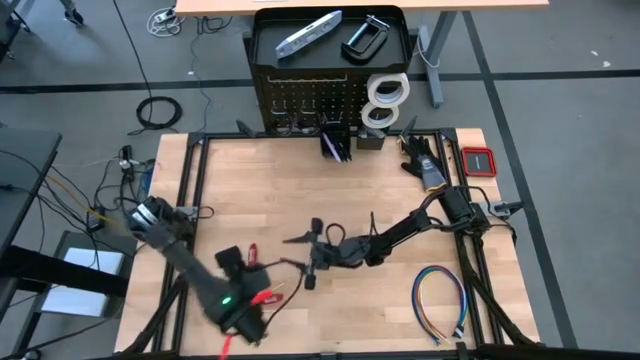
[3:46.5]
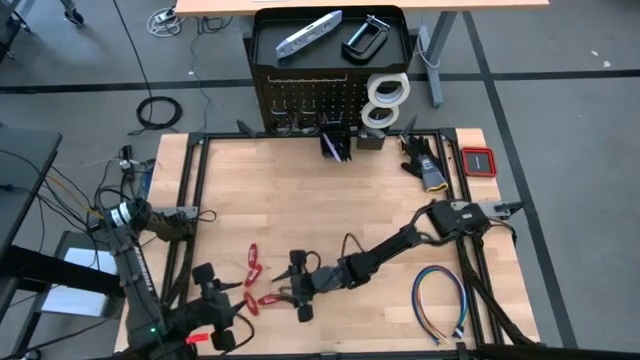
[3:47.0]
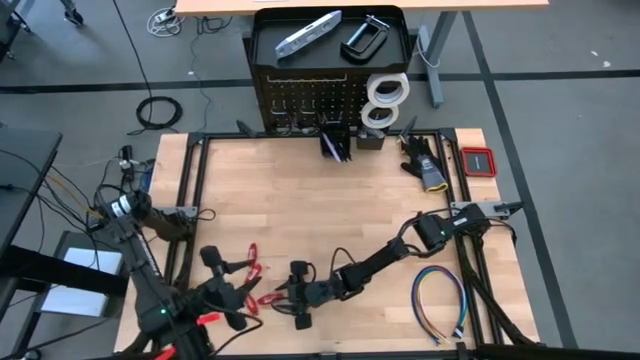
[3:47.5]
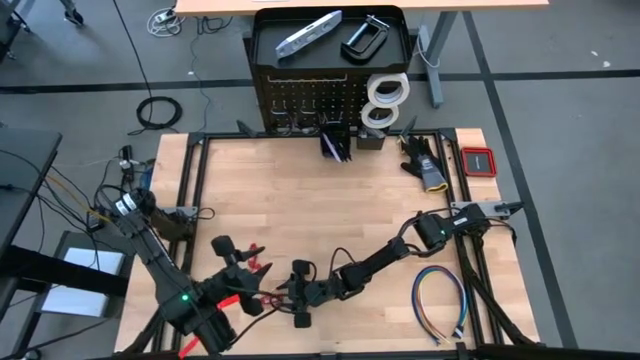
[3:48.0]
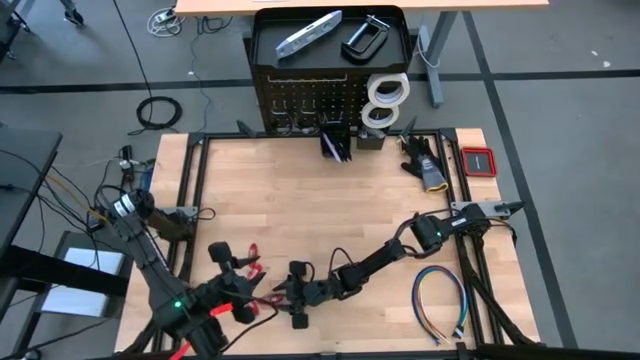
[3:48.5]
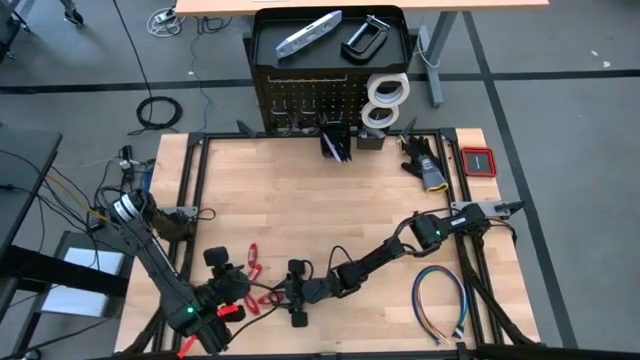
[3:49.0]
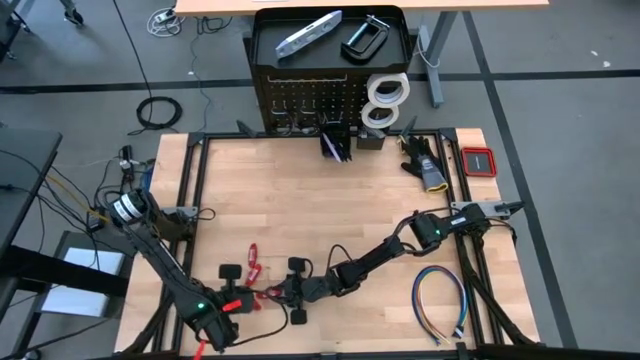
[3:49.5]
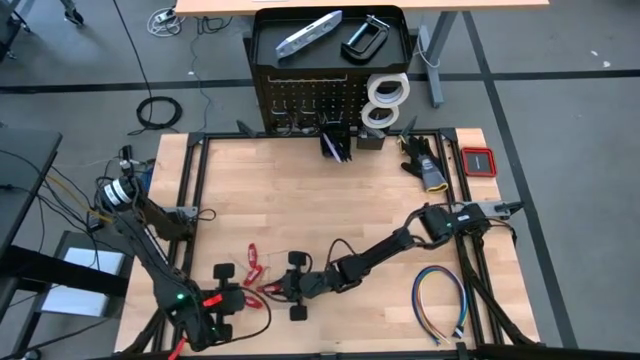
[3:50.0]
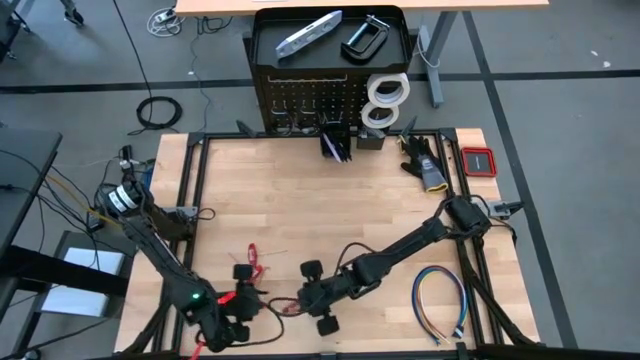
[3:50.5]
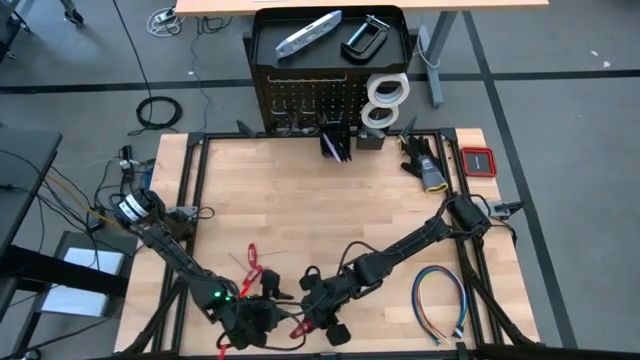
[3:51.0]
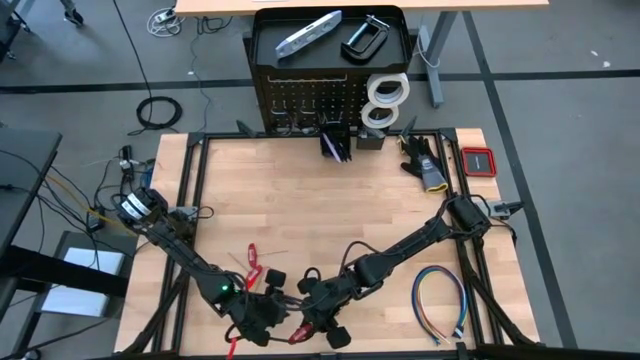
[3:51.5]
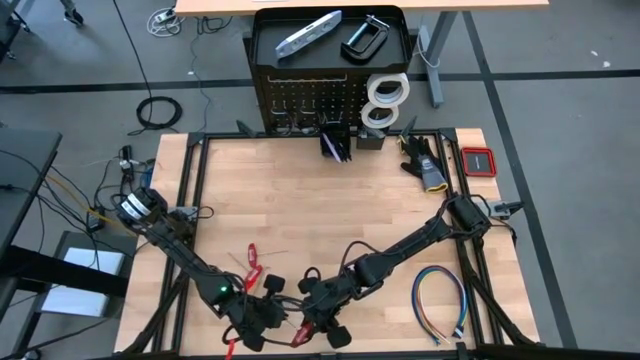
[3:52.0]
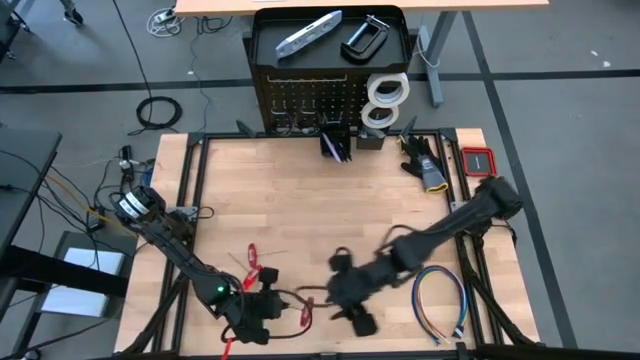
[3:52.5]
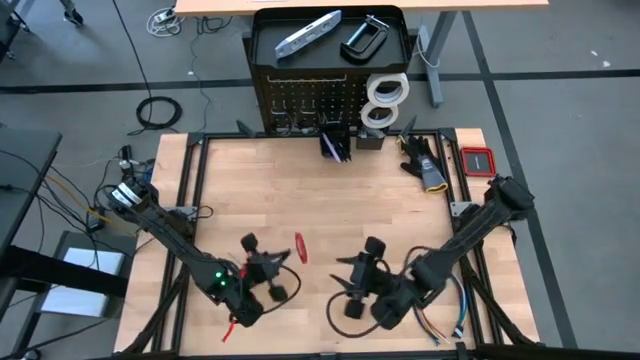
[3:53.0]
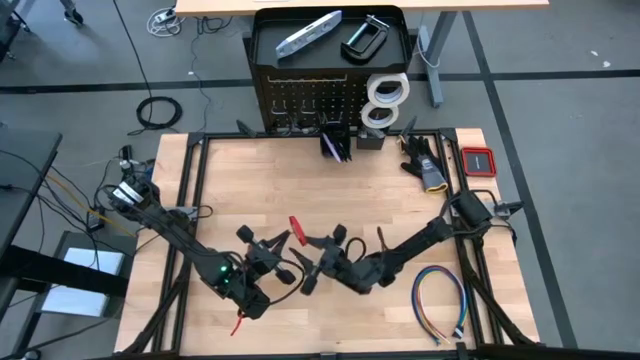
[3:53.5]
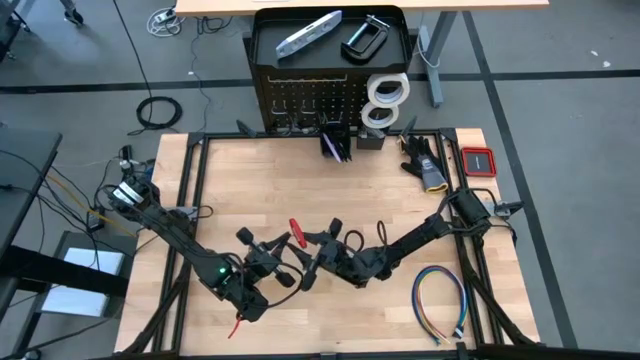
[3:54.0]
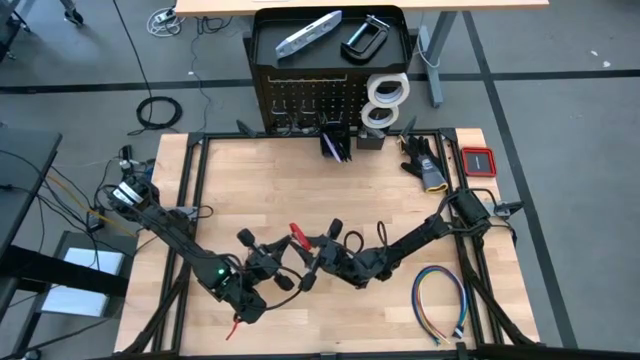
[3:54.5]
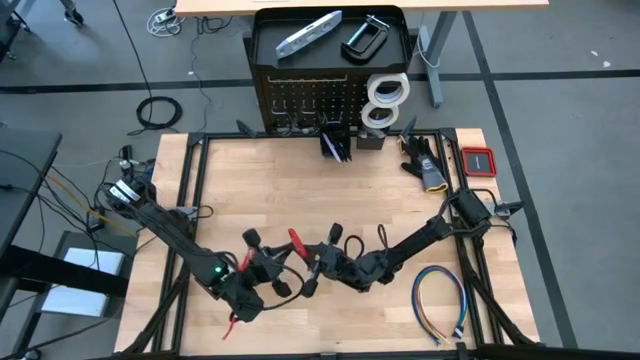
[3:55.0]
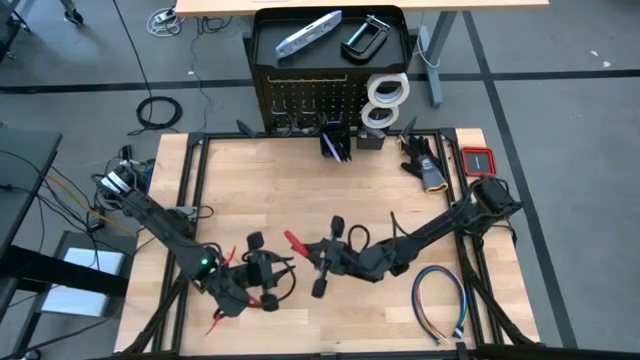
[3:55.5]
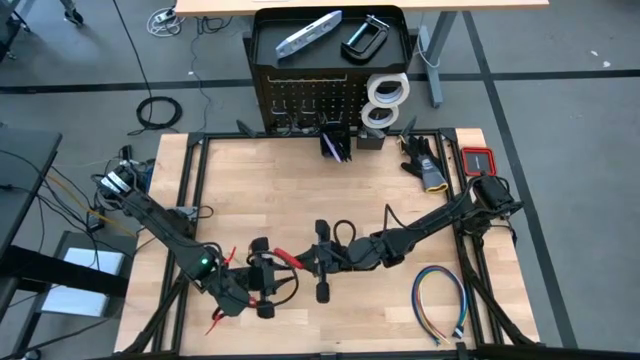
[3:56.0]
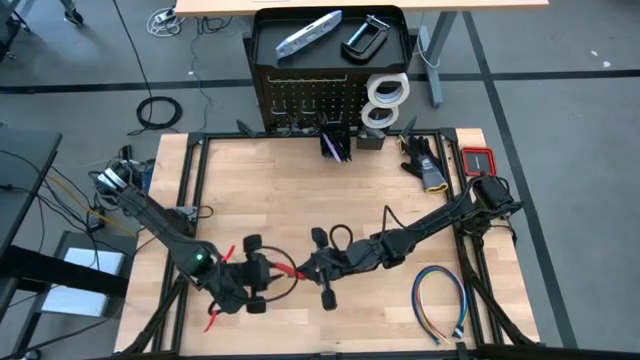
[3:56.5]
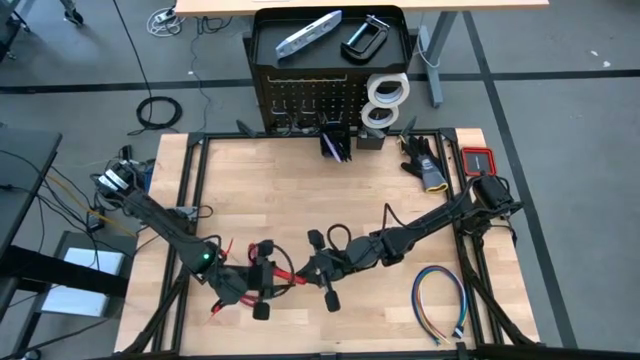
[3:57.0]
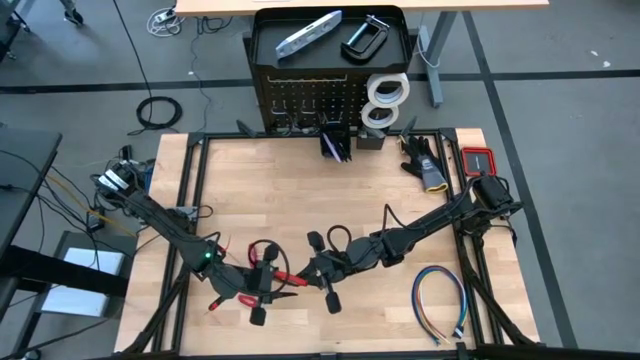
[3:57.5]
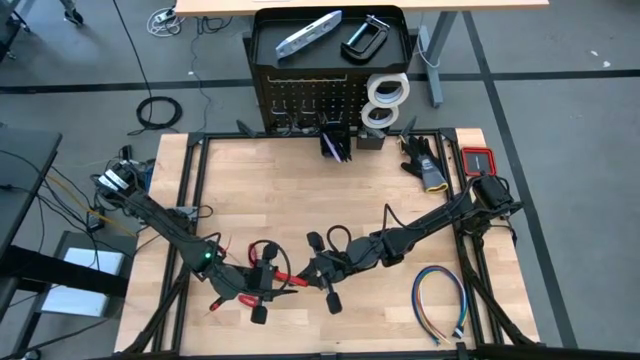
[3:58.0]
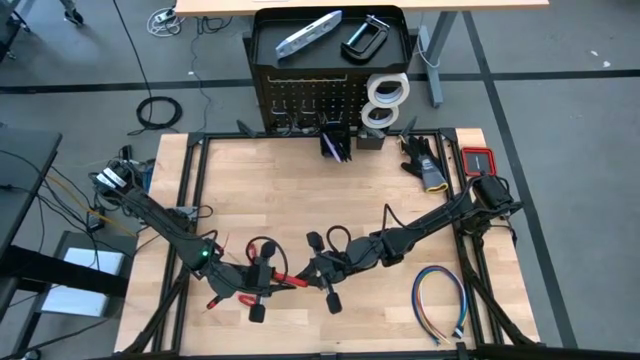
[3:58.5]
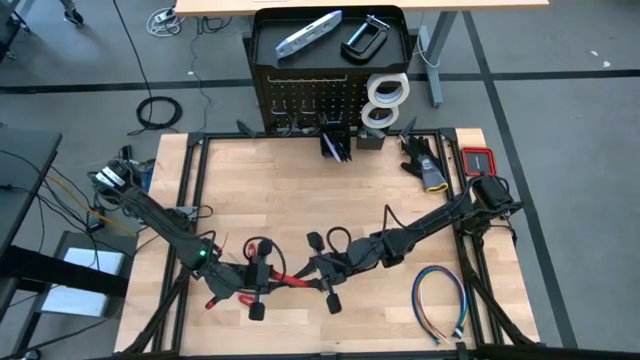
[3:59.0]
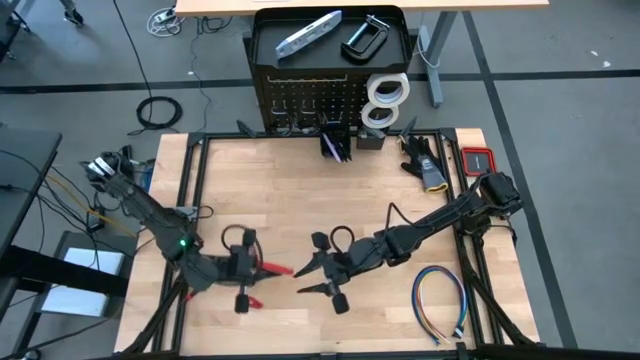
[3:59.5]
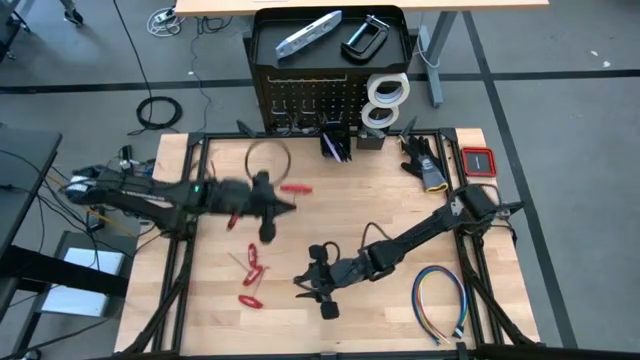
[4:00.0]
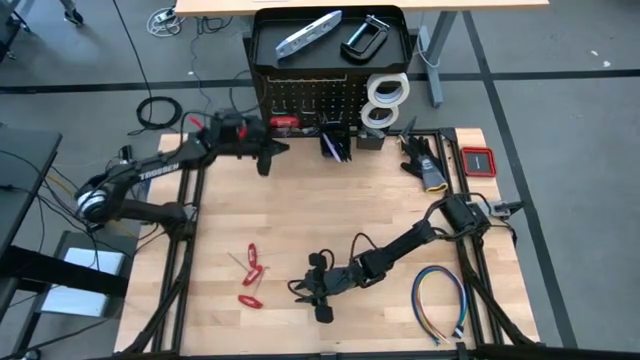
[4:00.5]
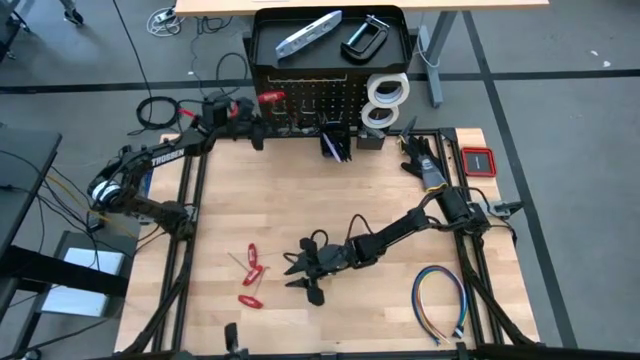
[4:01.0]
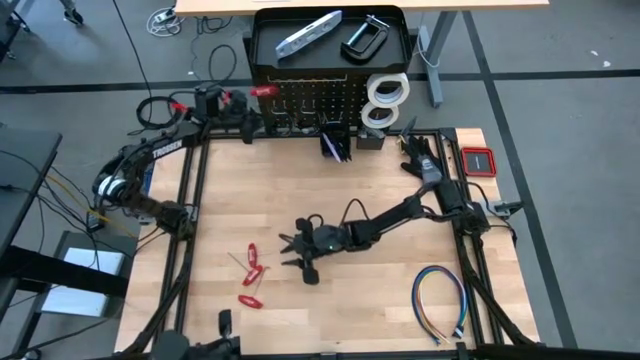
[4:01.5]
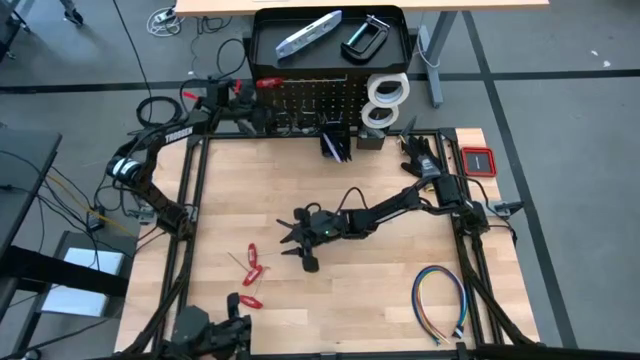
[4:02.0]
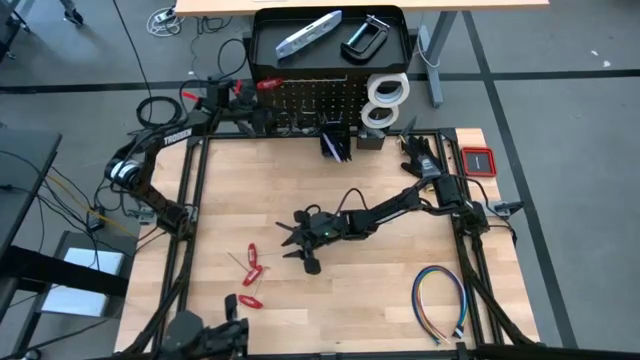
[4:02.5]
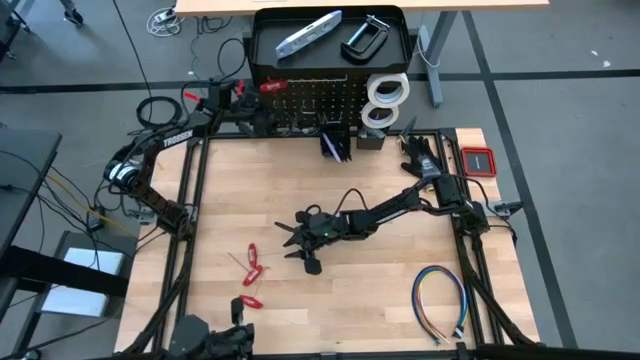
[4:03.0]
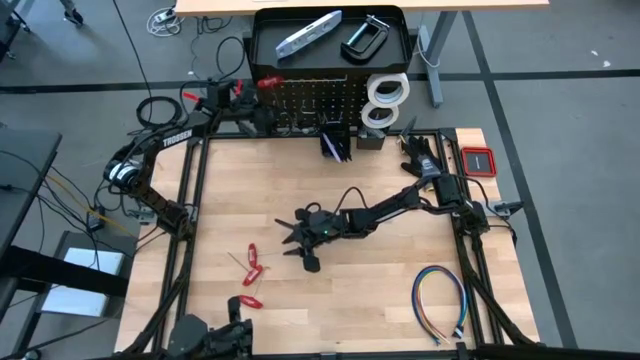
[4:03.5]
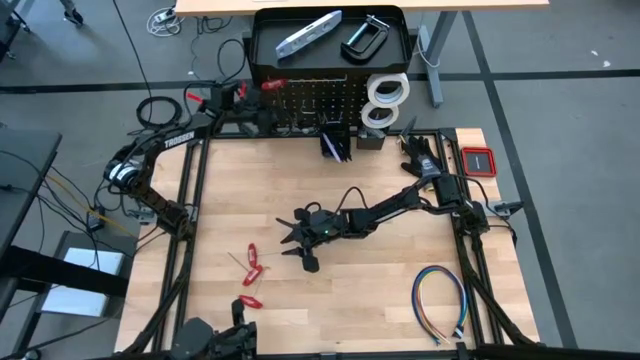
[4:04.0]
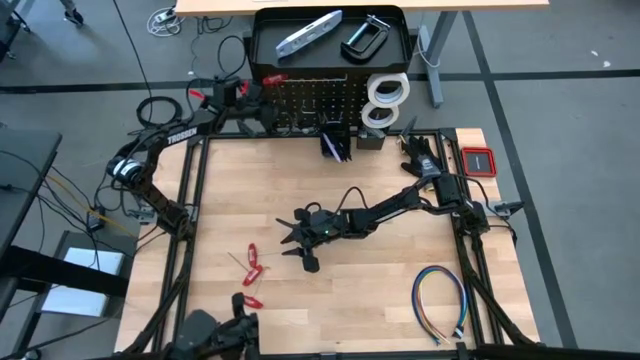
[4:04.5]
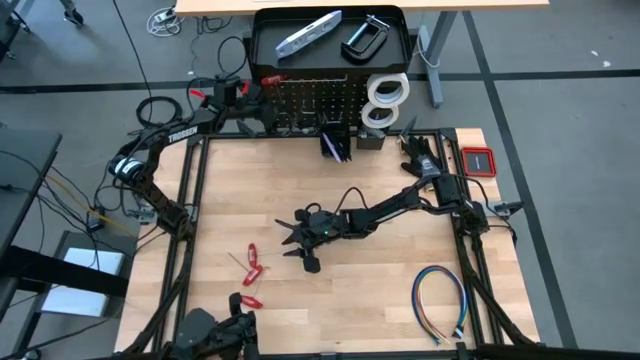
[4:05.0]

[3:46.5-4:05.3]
Task: Hang tools onto peg board
Hang the red allen wrench on the peg board

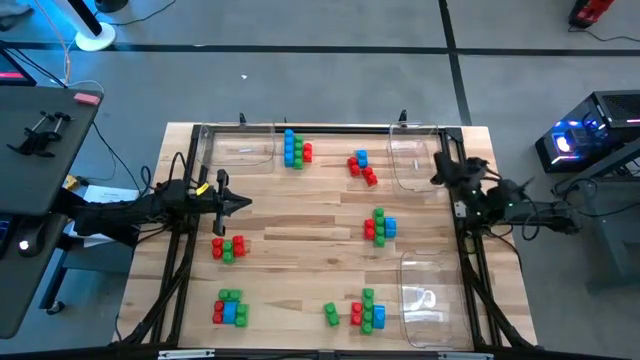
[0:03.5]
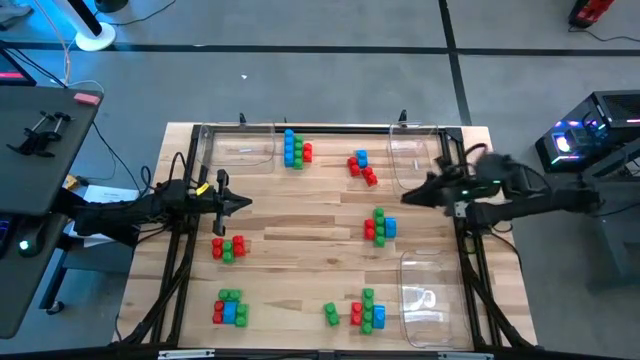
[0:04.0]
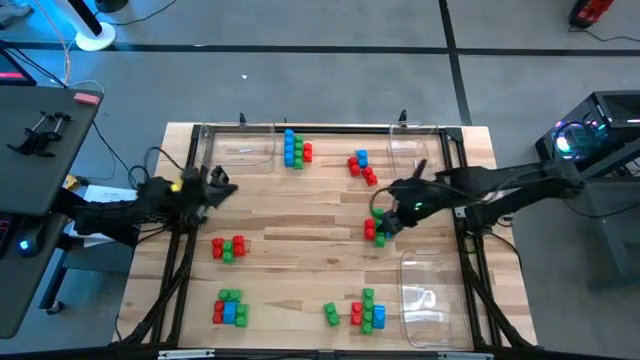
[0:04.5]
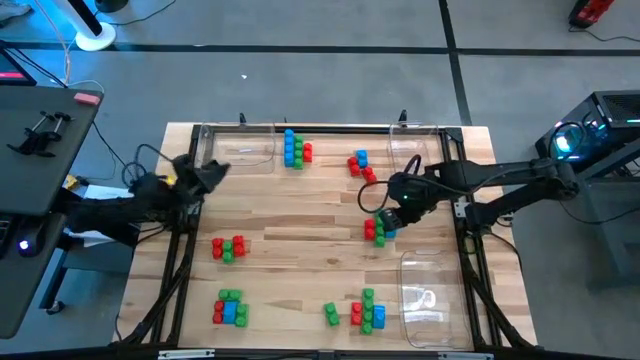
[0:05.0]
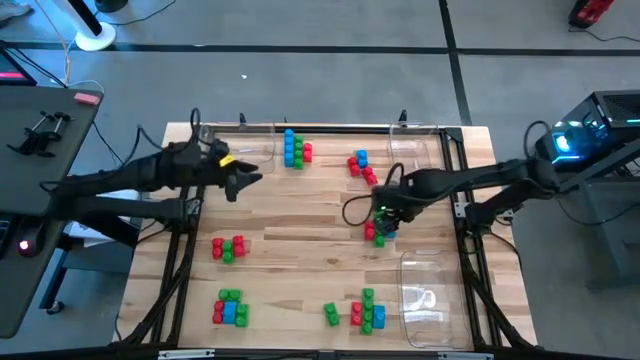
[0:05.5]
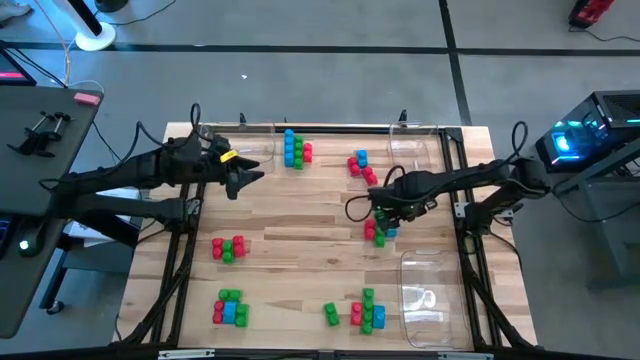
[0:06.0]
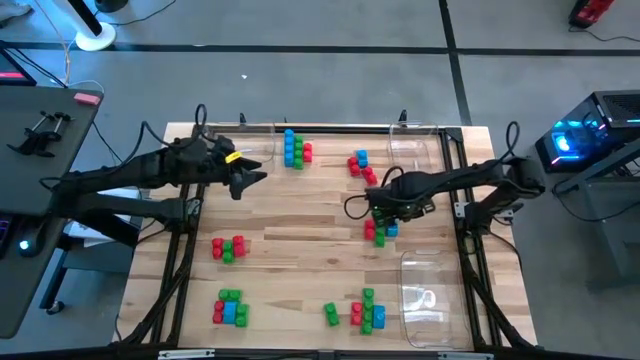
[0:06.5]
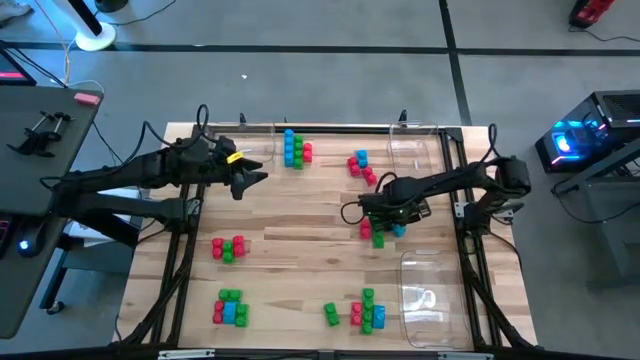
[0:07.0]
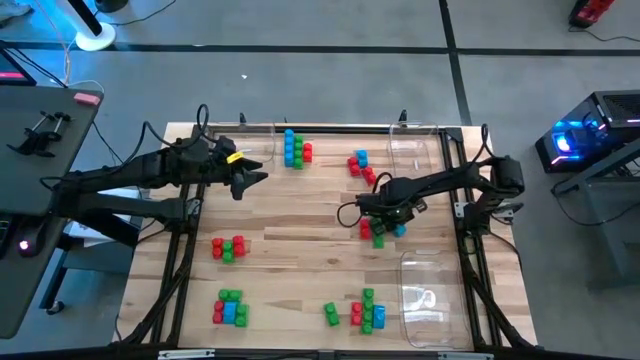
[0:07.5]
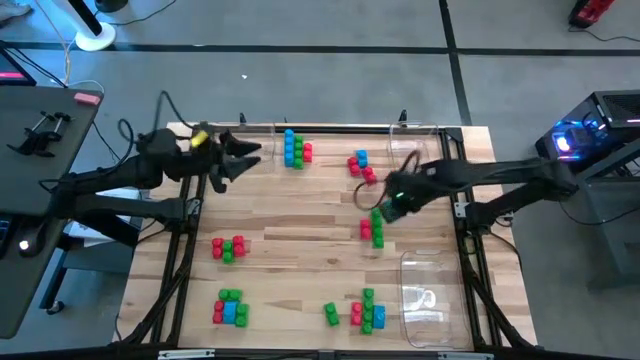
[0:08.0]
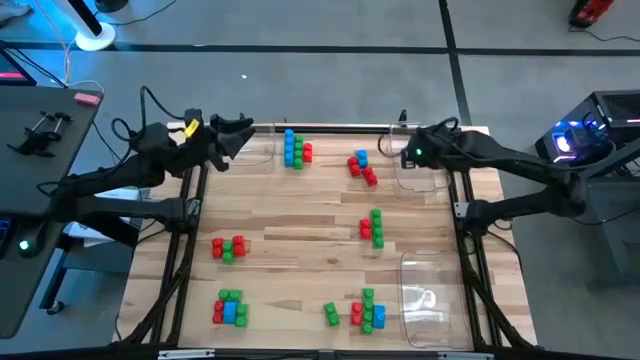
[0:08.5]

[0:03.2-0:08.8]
Task: Sort blocks
Put the blue game piece into the top right transparent bin
